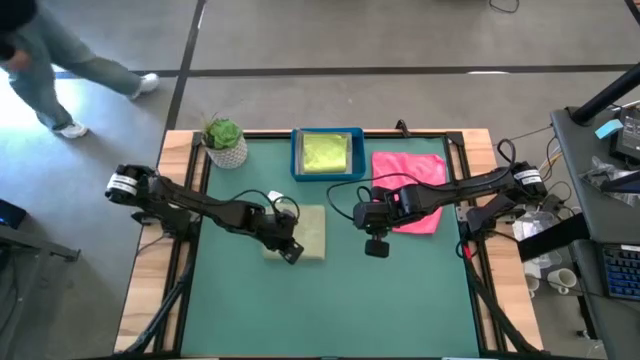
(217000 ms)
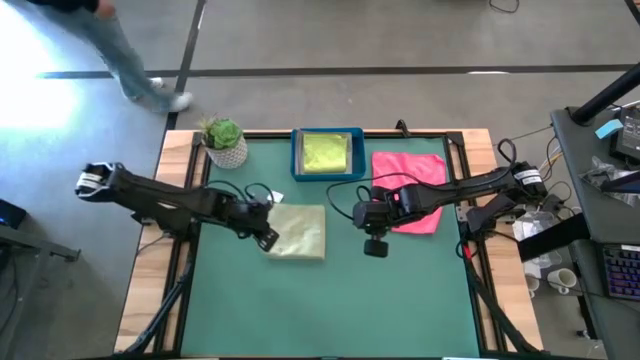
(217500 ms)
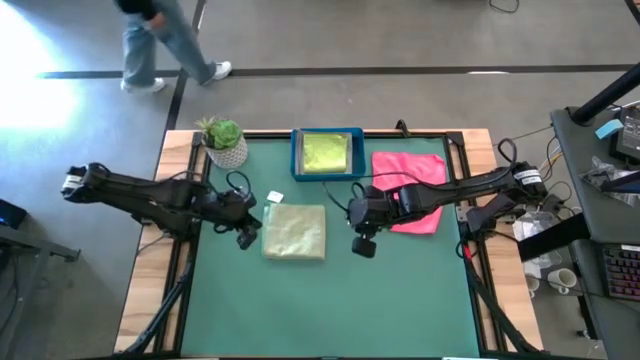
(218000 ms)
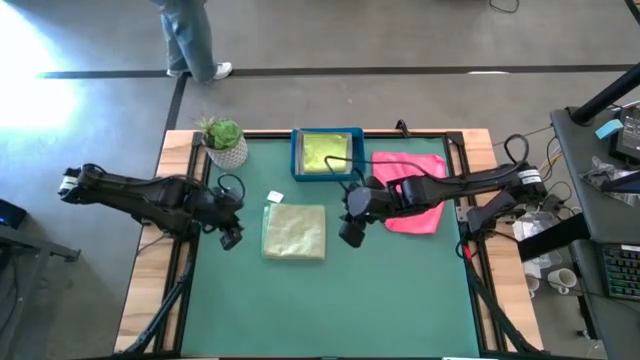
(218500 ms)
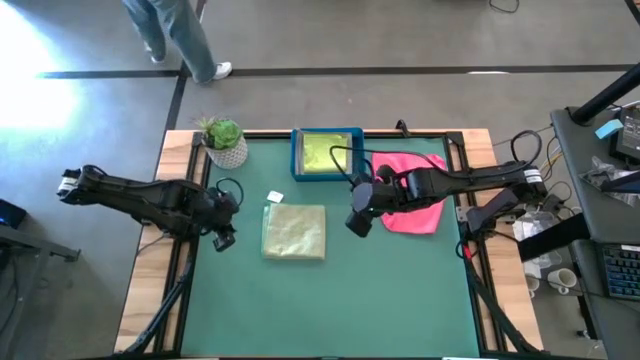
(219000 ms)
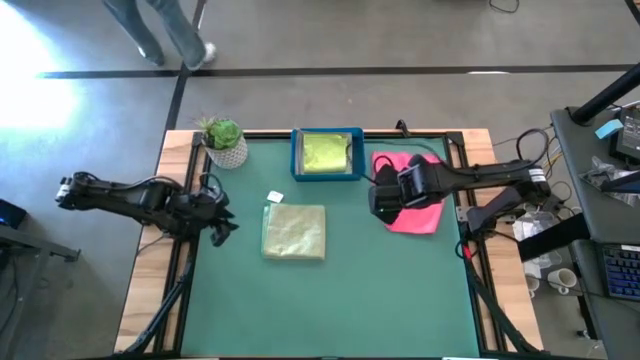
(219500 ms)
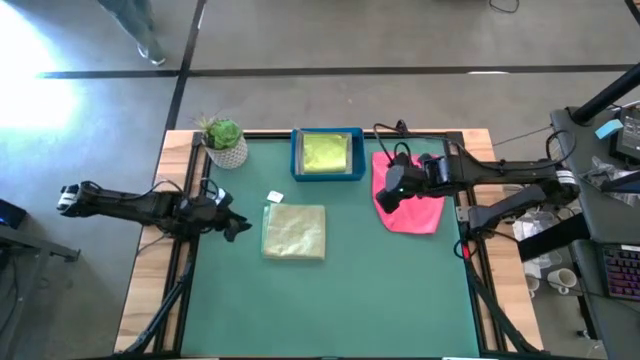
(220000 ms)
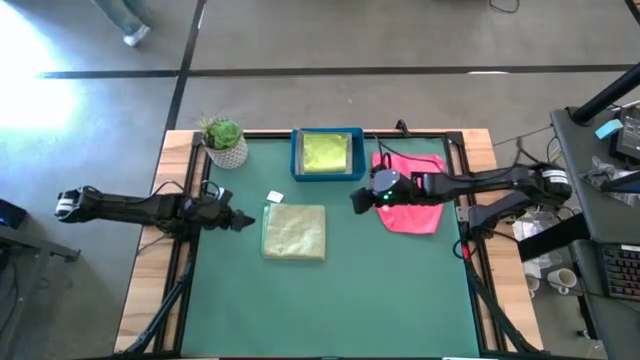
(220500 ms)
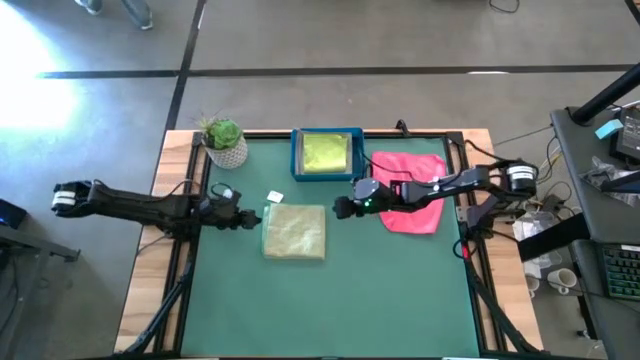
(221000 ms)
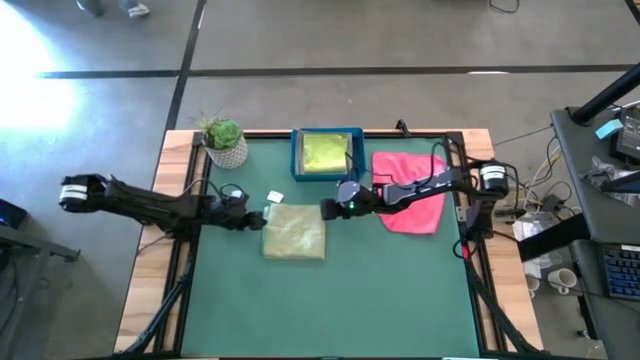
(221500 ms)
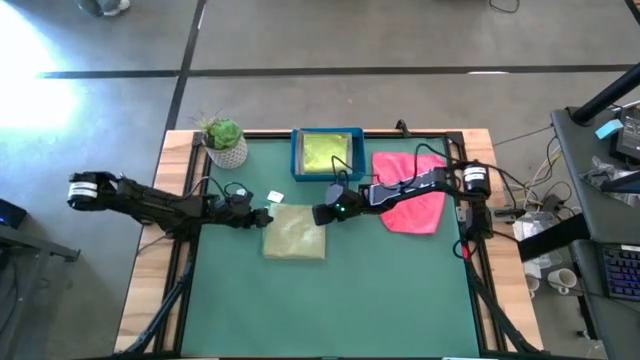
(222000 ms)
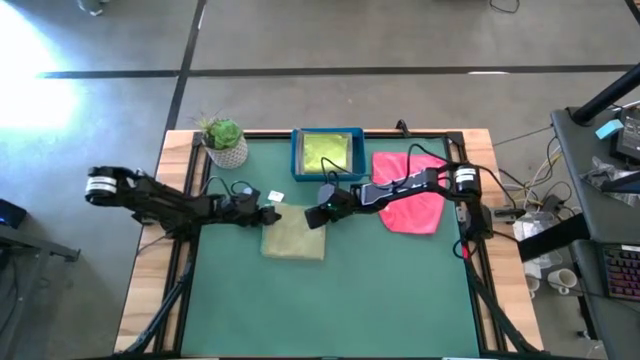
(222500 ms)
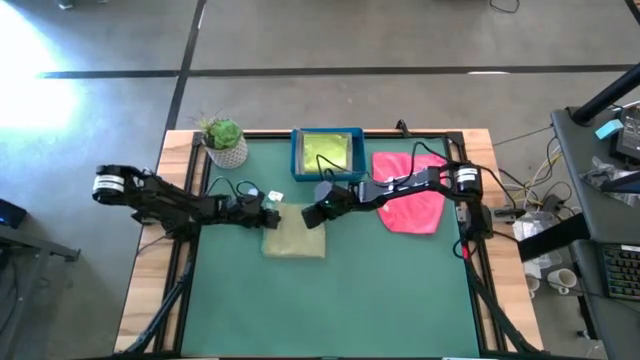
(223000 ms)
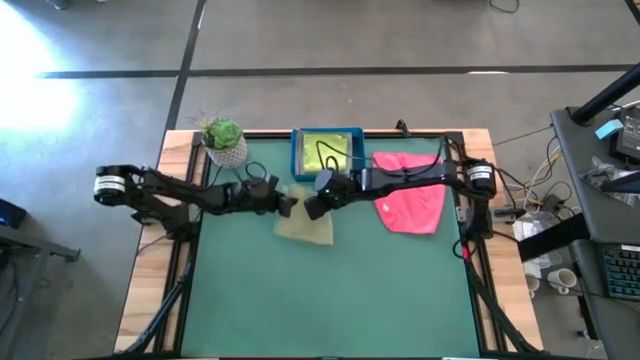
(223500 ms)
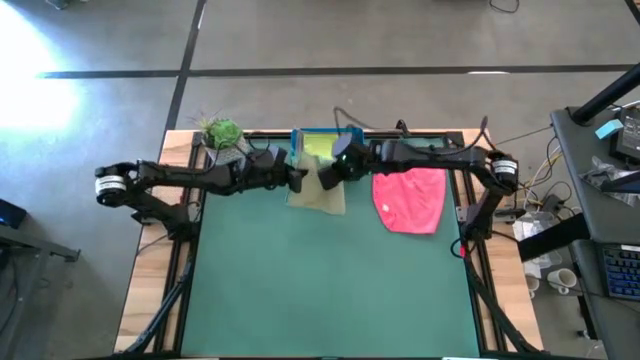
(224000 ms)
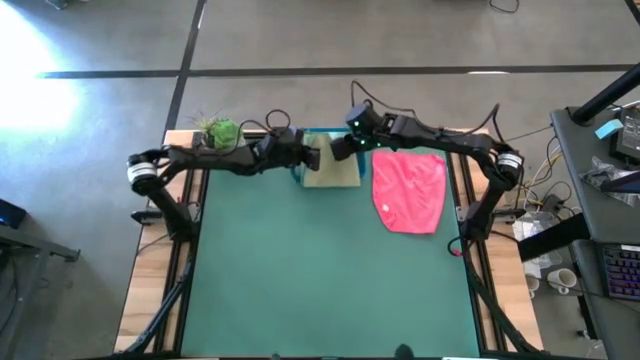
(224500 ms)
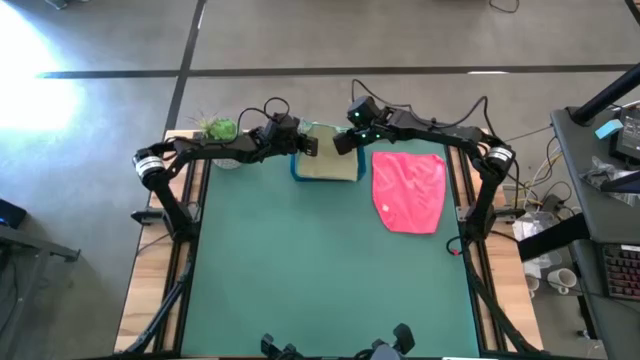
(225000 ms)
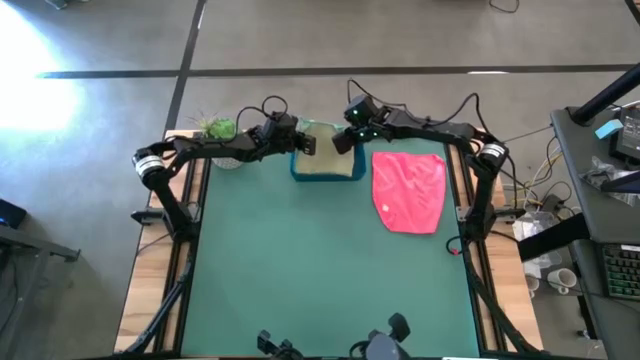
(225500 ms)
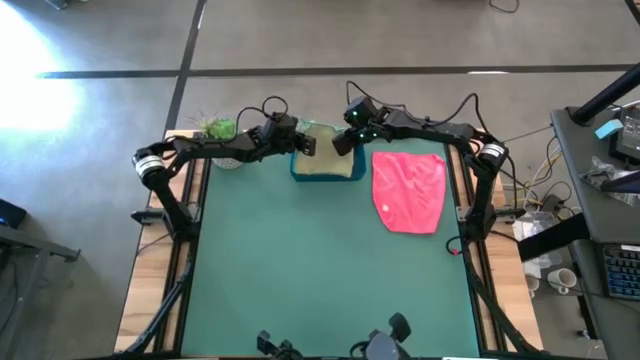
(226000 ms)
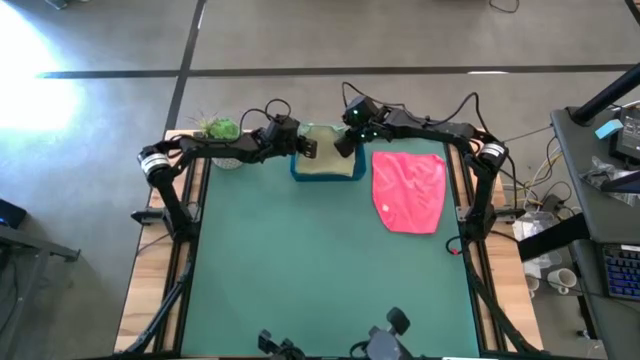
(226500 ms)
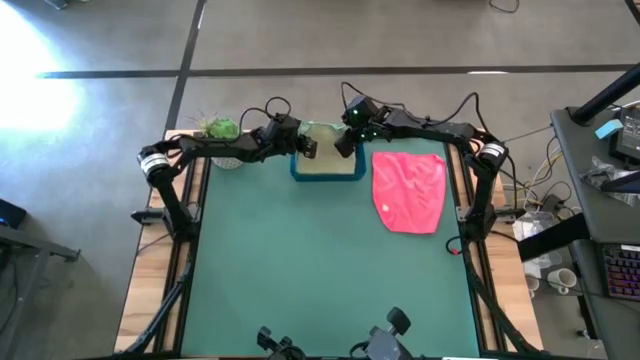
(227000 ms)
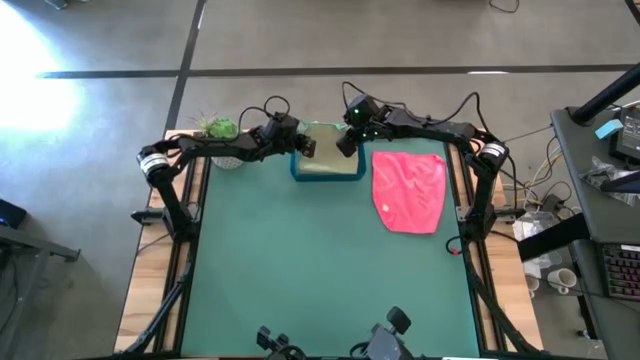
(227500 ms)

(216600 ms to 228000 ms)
Task: Fold microfiber towels
Put the dark green microfiber cloth into the blue bin

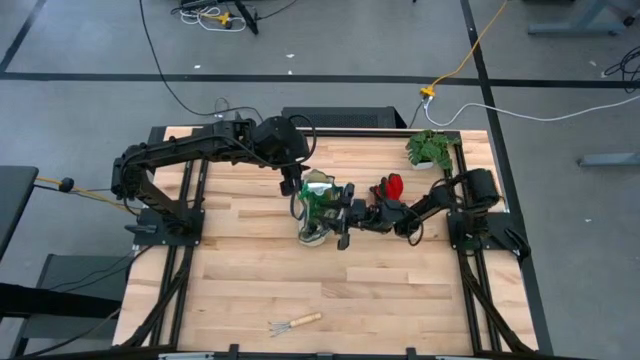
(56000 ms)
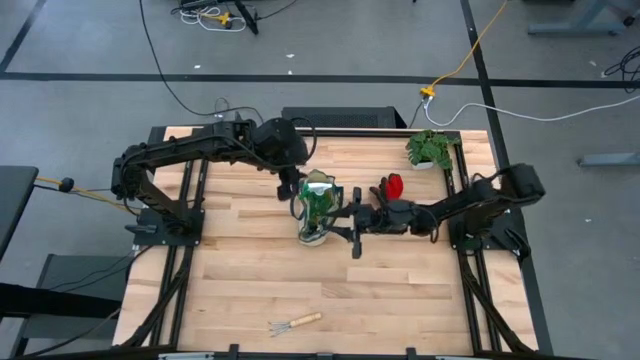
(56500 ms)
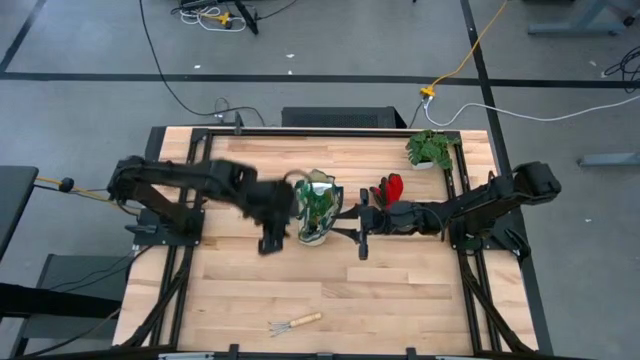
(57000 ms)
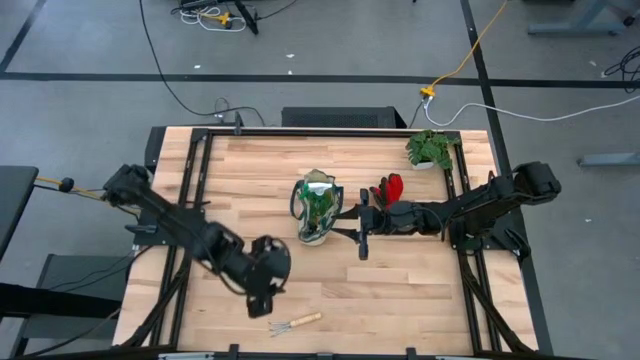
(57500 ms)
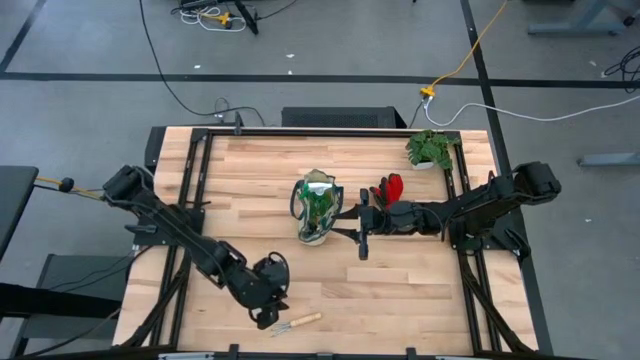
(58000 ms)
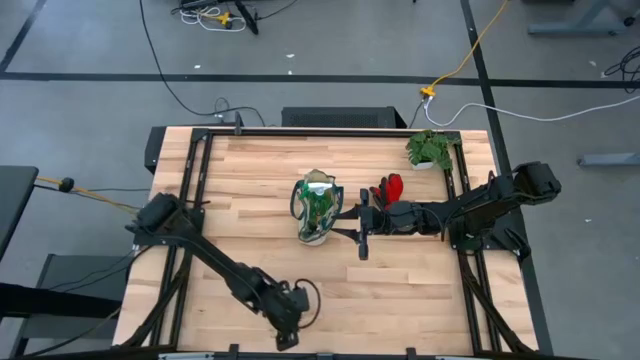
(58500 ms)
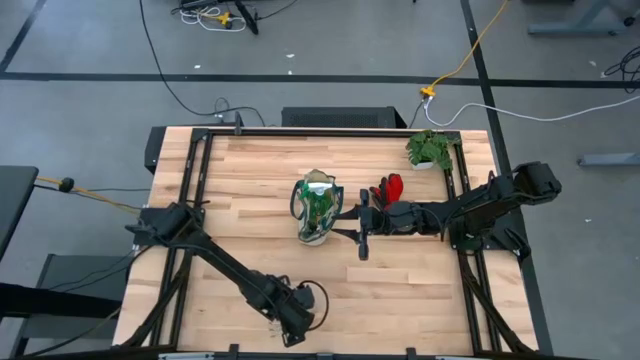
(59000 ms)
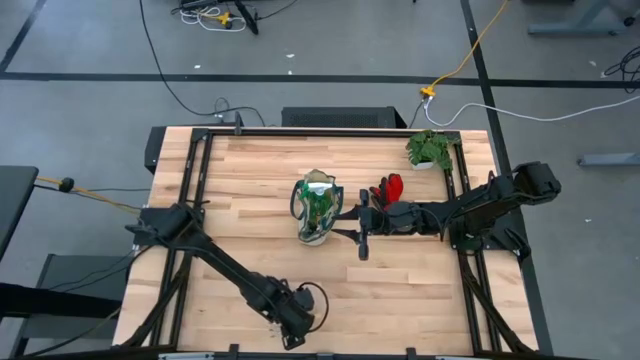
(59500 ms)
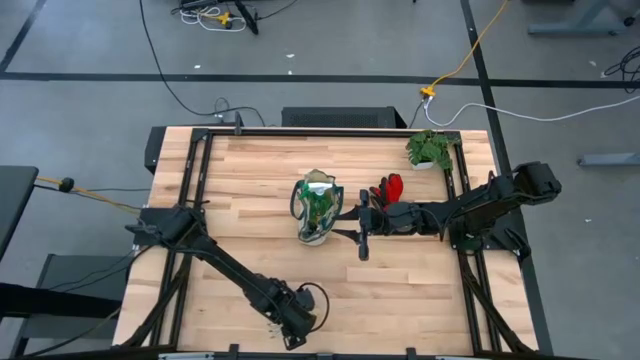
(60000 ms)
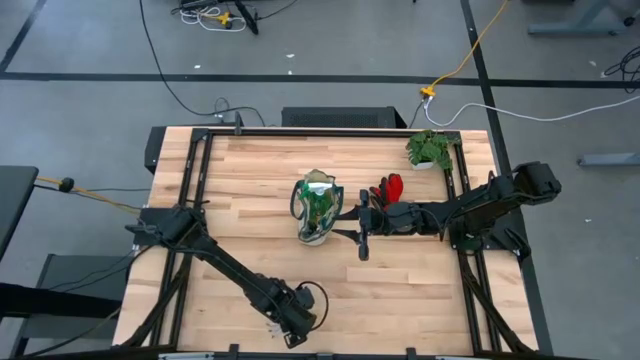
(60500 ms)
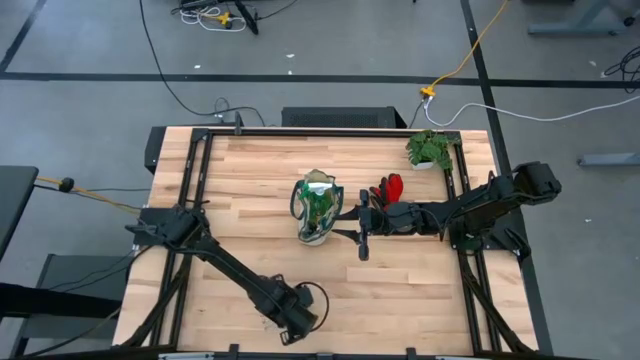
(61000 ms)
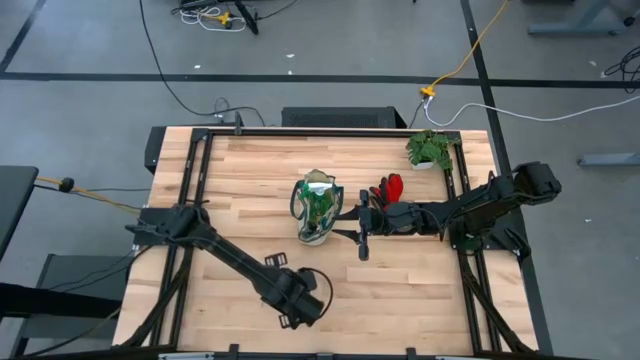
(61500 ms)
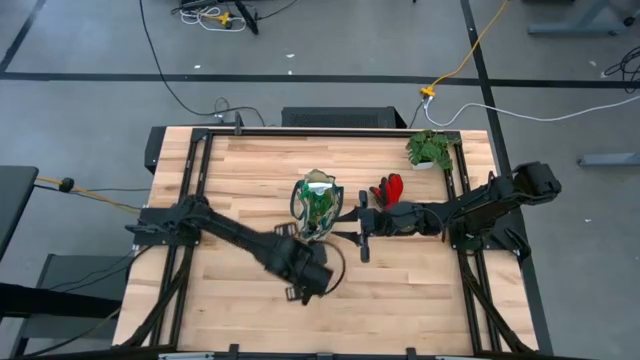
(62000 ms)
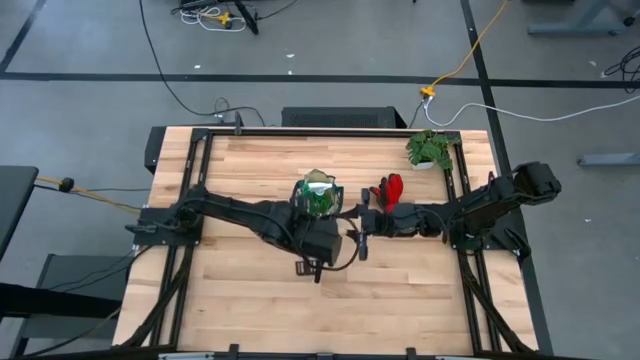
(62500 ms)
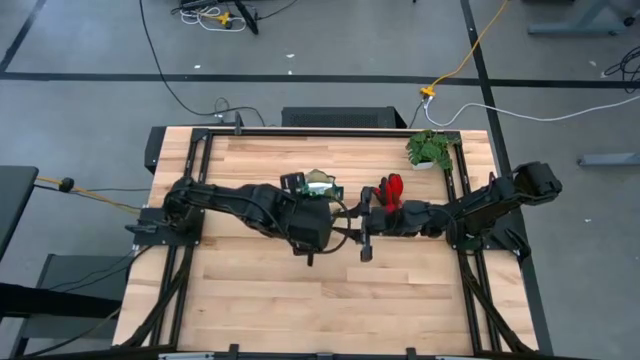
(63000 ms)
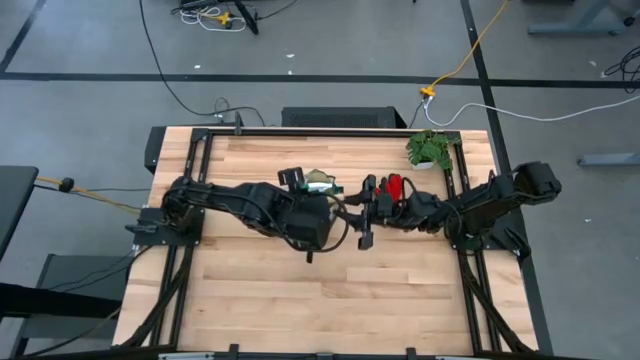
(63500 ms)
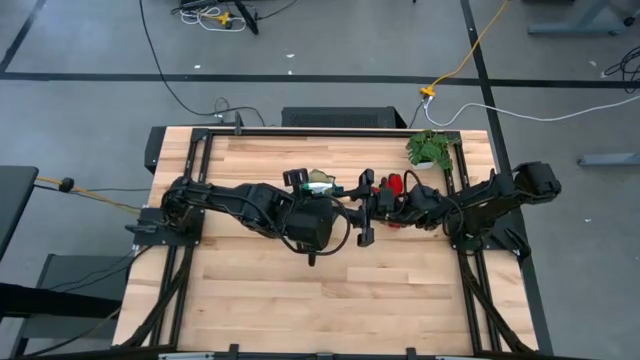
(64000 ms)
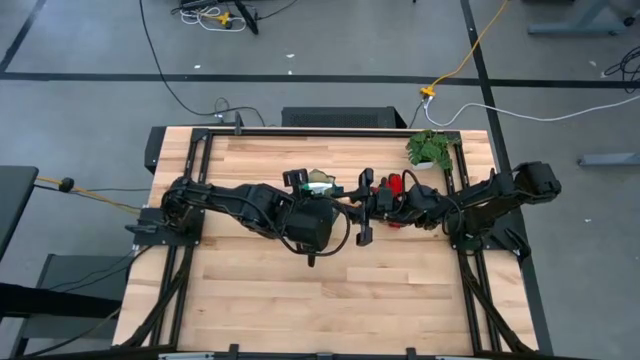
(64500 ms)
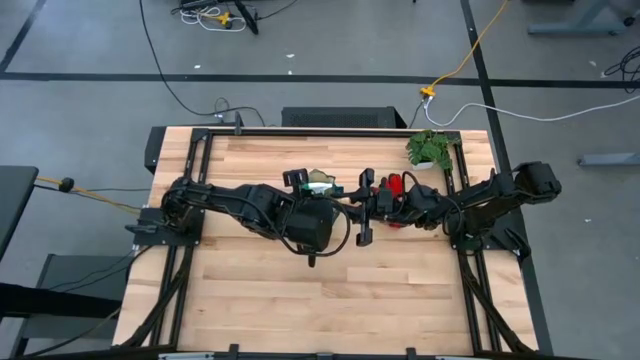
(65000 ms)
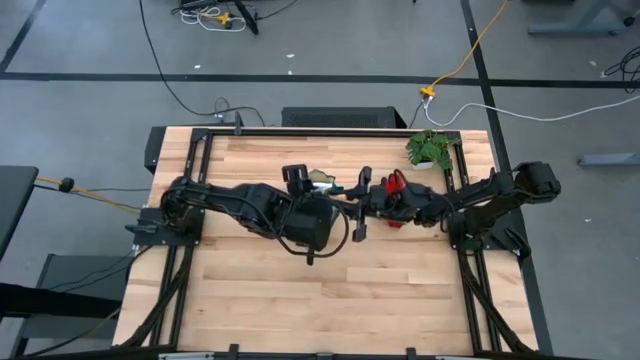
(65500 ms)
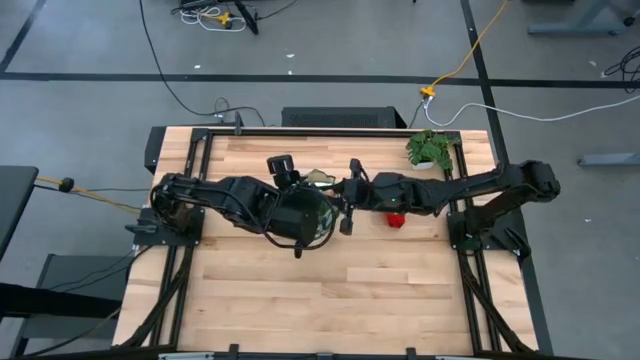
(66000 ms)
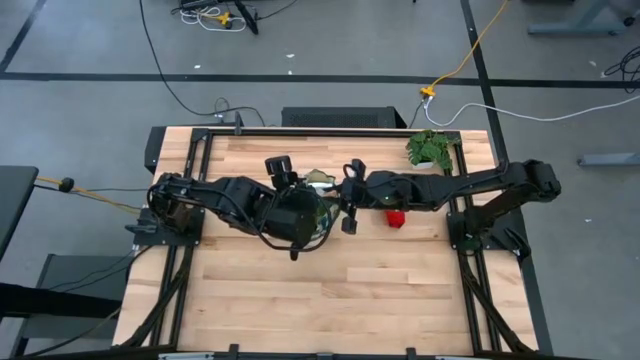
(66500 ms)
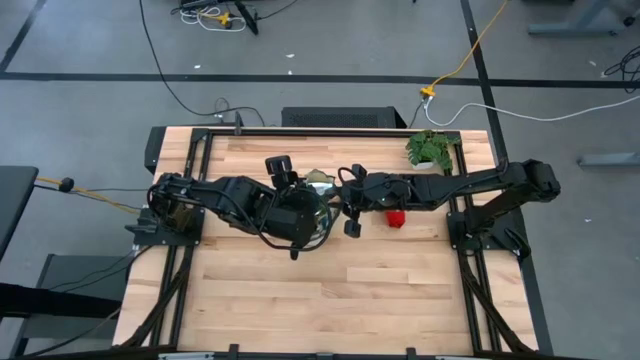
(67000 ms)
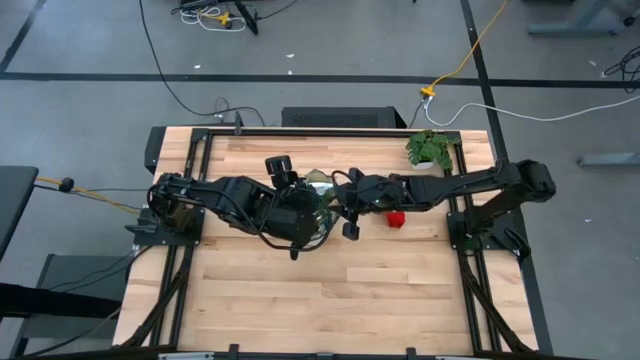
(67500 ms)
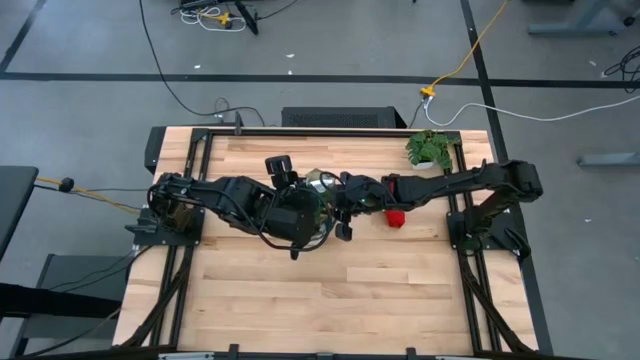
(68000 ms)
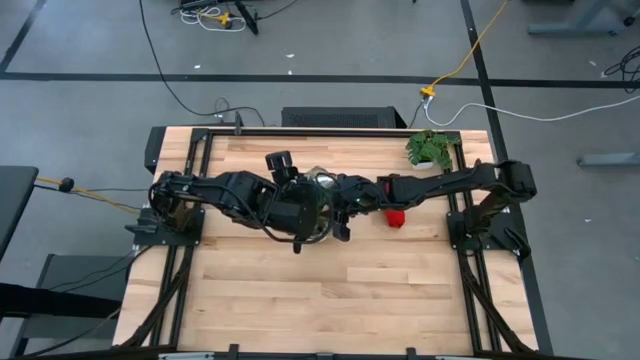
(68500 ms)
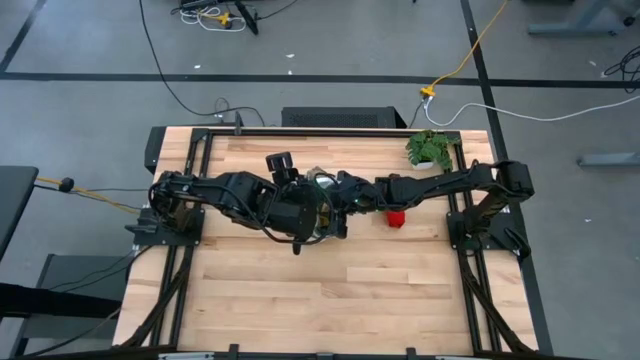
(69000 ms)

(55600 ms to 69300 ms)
Task: Pick & Place Garden tools in Gardening bag
Put the brown hand rake into the brown gardening bag
